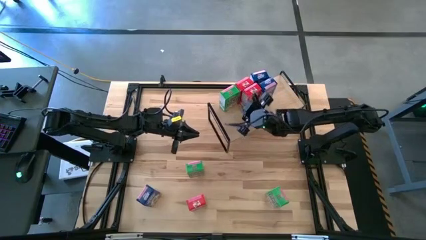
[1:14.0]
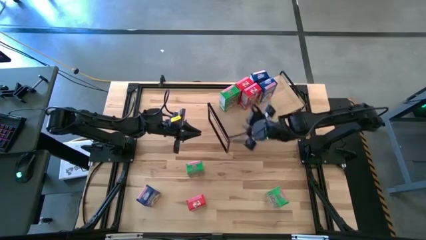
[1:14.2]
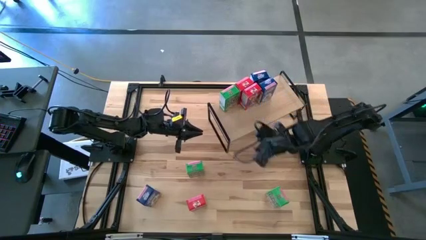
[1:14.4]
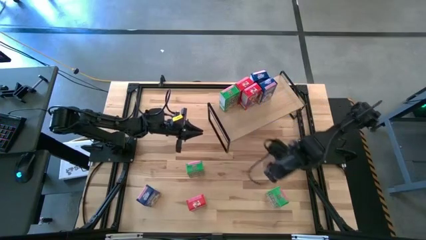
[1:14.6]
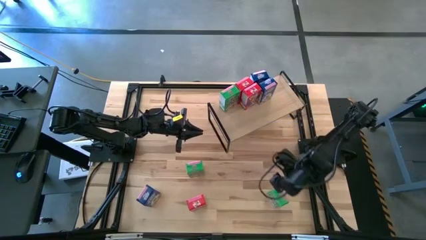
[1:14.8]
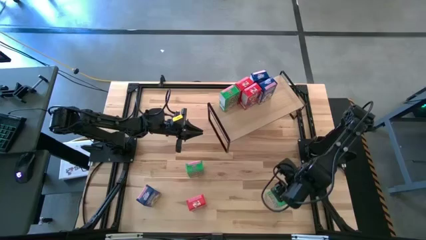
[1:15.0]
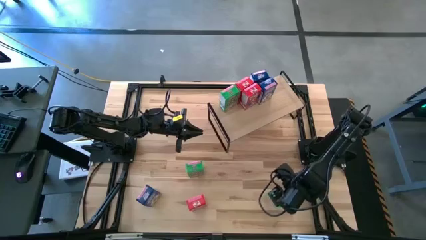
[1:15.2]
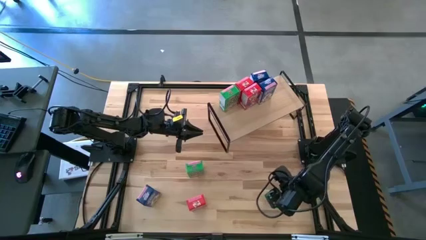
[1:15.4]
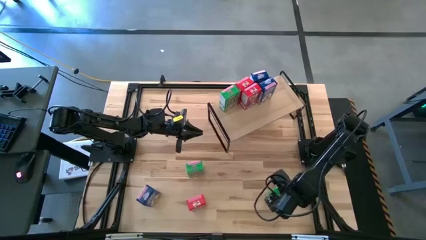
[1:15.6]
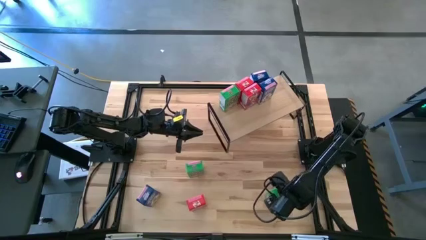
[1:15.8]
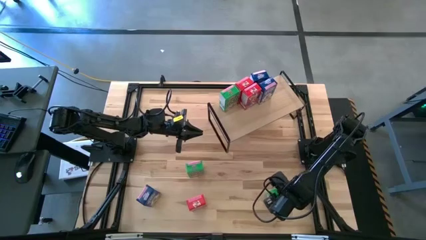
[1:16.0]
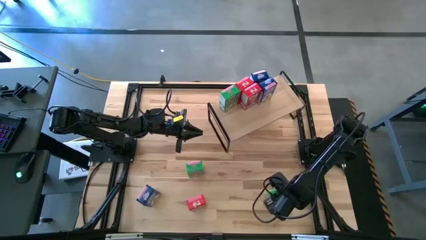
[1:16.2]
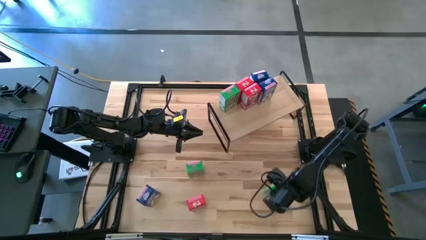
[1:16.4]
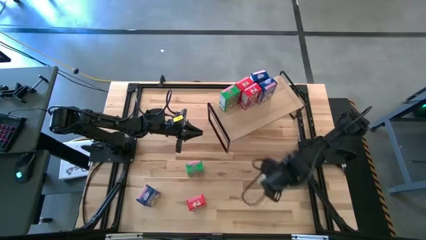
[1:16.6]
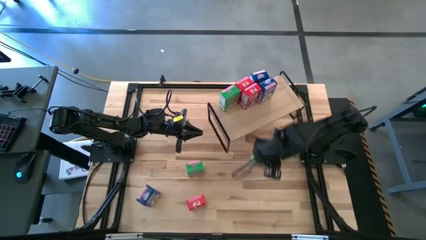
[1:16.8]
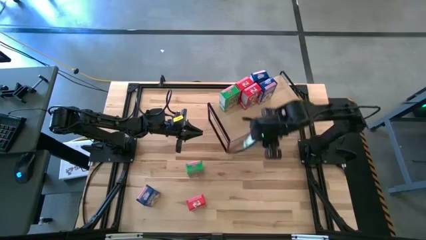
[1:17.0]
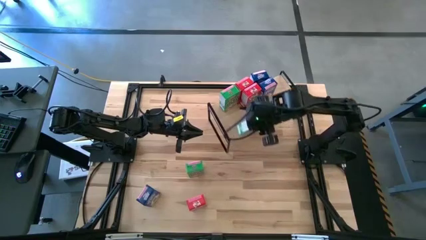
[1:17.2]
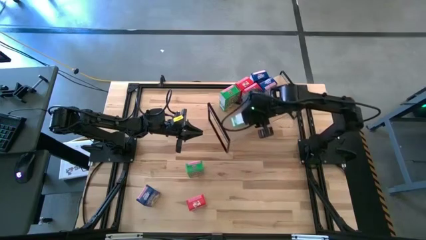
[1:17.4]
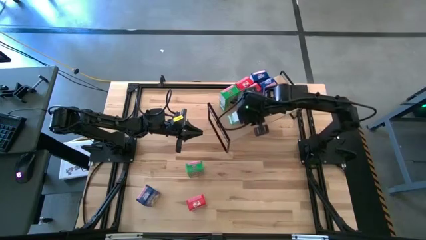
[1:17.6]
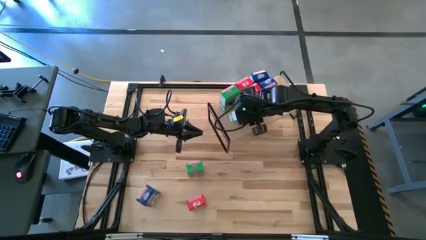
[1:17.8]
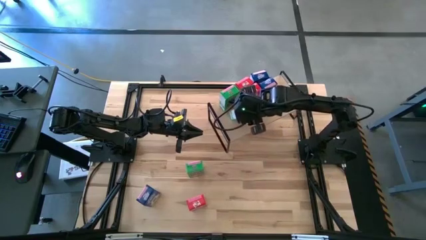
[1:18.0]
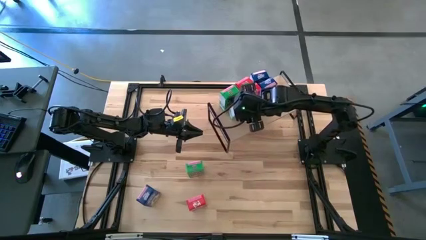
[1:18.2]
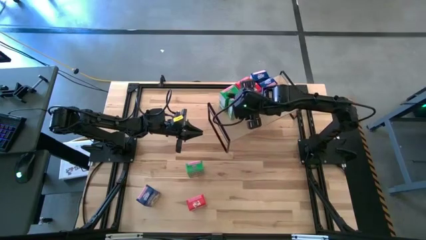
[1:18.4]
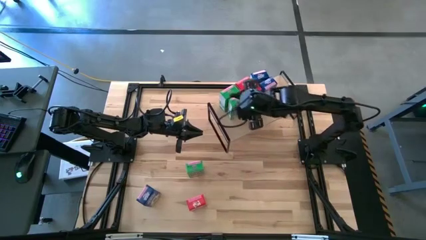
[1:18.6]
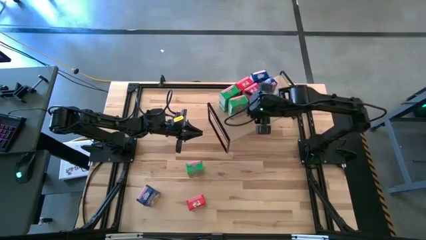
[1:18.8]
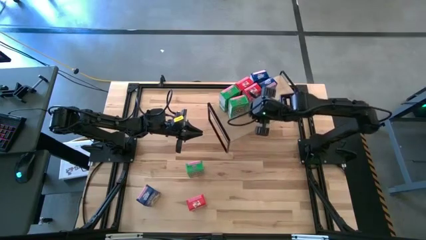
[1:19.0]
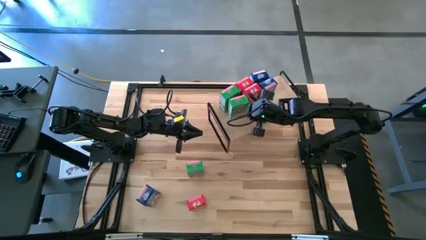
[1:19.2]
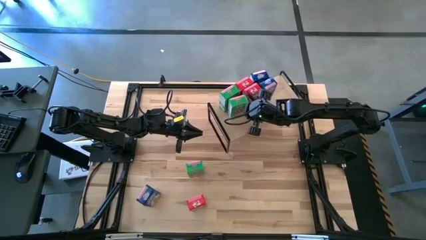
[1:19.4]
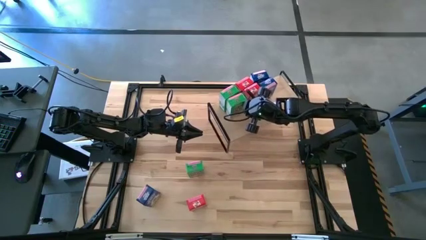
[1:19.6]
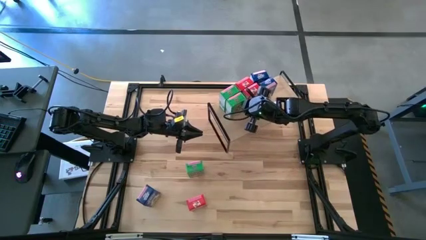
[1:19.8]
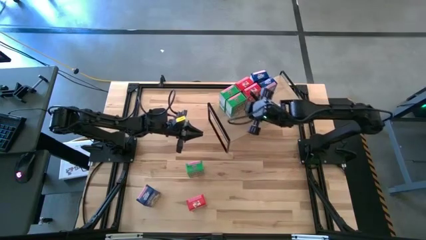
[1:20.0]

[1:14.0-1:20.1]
Task: Stack cereal on shelf
Put the right green cereal box on the shelf and aligned with the other green cereal box

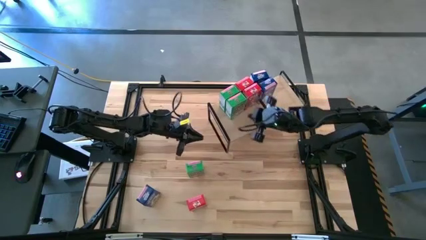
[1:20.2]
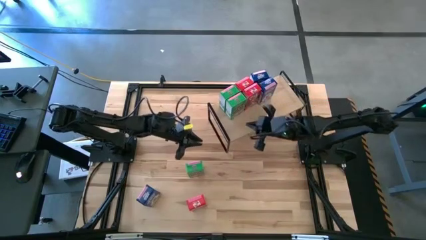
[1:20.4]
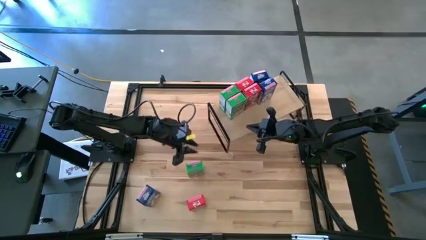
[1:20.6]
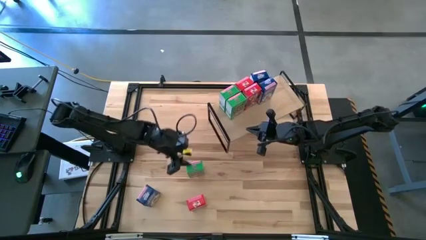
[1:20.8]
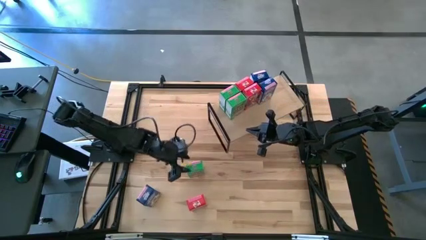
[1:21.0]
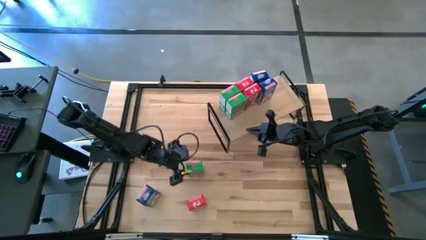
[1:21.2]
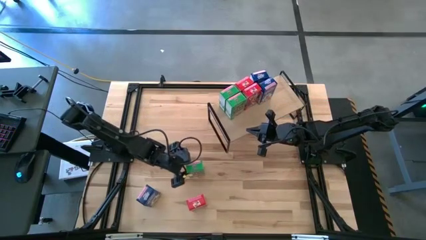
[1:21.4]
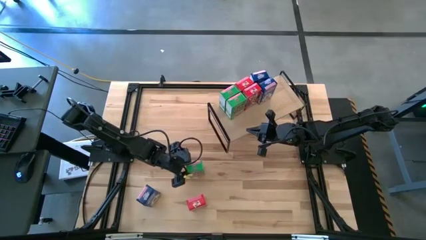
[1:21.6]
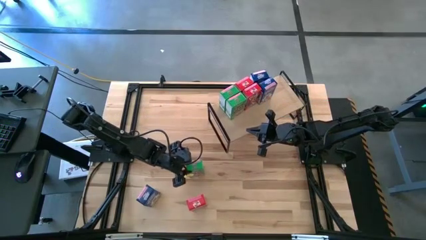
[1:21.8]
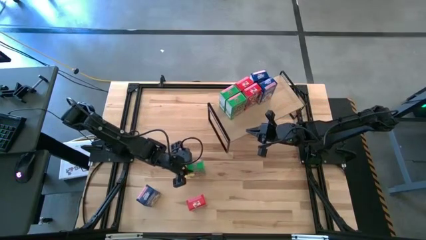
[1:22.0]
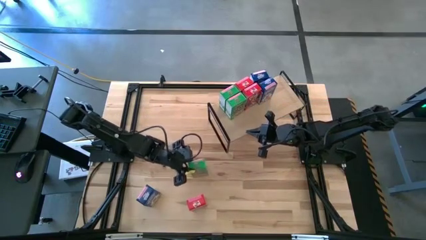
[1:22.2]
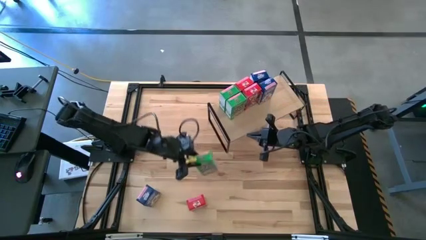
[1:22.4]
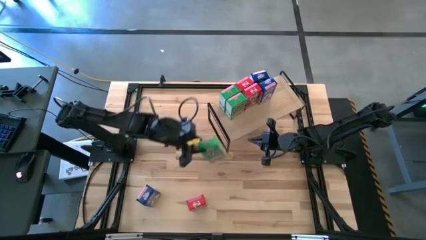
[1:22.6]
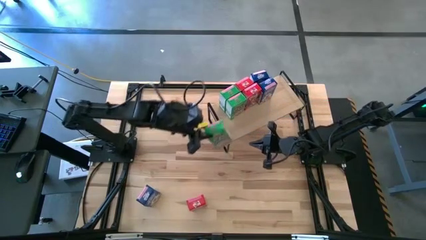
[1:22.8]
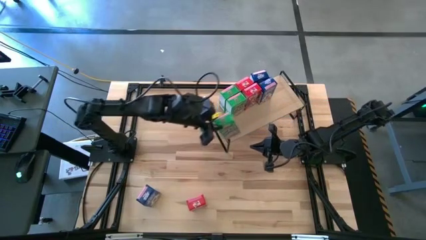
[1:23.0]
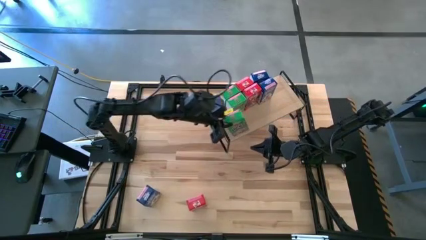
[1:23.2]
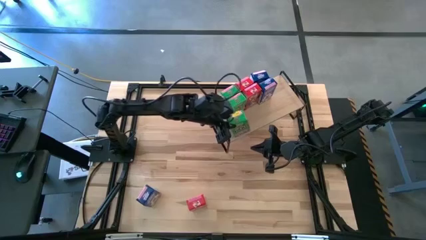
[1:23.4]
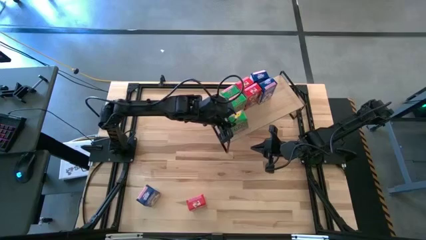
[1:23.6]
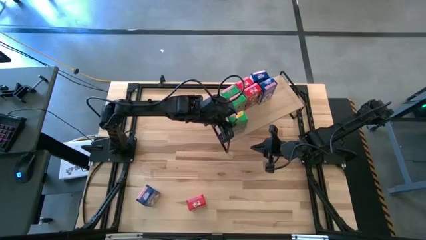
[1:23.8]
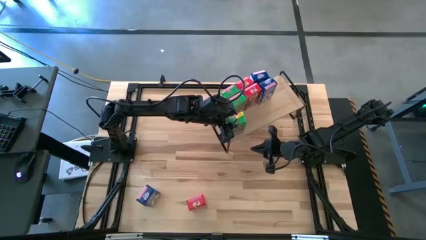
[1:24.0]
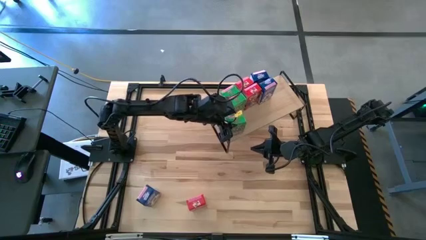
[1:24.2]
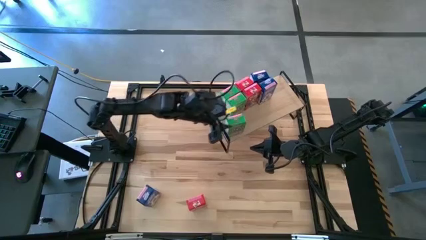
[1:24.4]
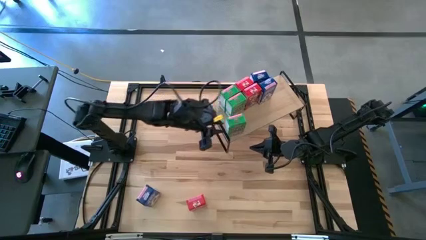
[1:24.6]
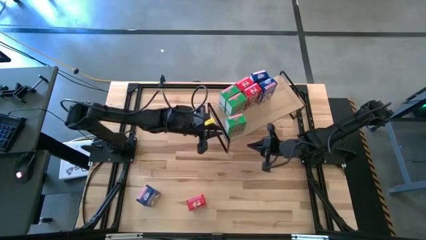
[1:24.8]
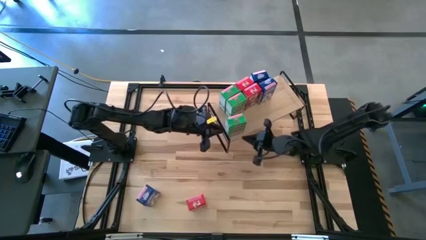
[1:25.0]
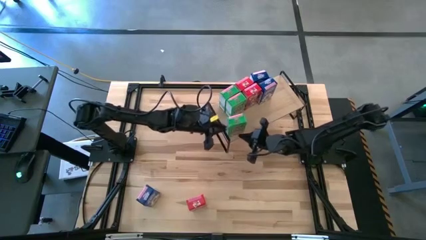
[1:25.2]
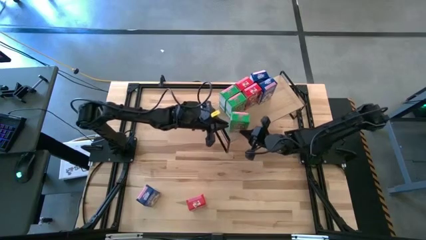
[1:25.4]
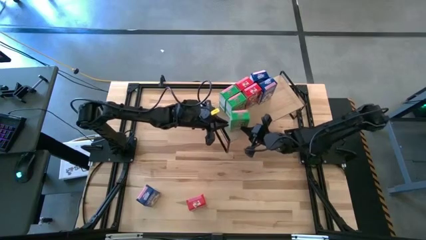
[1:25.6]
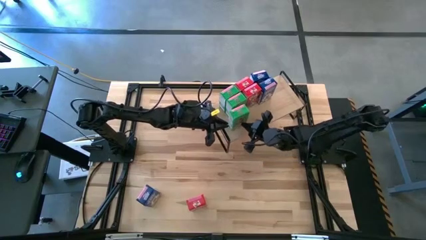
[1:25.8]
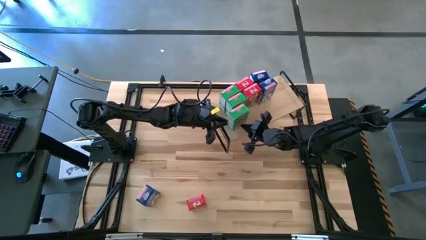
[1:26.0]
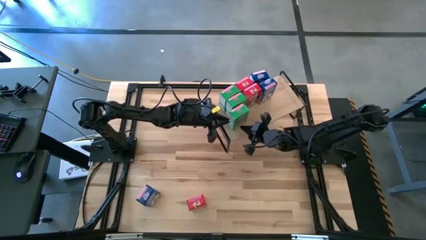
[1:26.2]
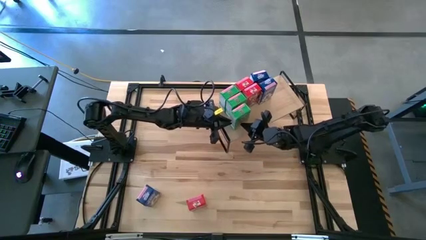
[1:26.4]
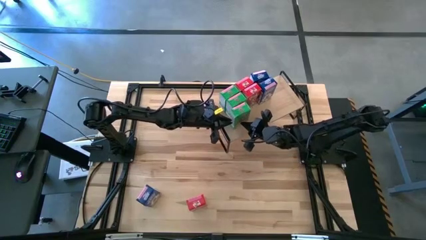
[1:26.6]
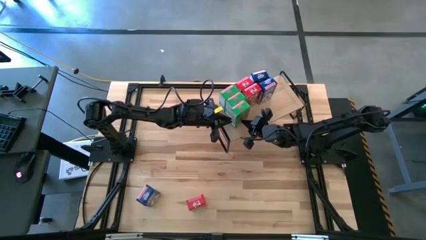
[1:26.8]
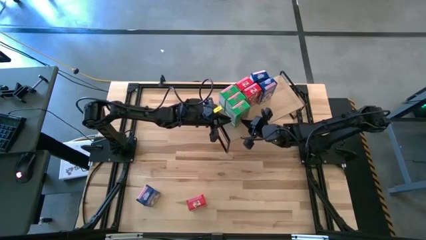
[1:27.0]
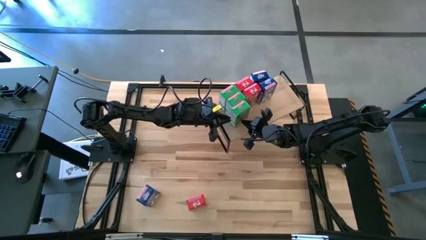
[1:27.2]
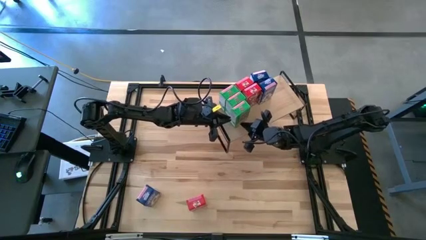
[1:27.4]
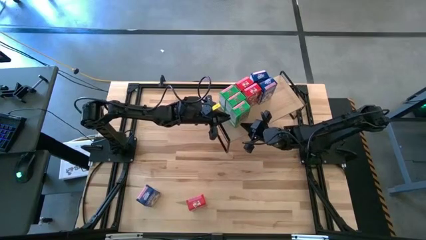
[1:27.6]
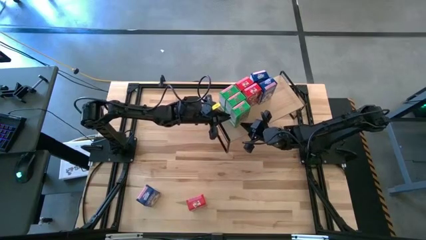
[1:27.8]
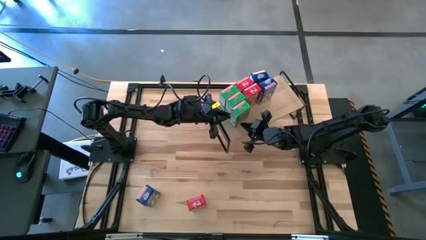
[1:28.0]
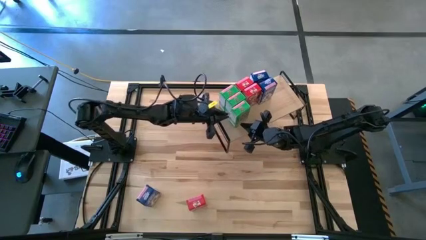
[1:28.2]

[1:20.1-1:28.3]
Put the green cereal box on the shelf and aligned with the other green cereal boxes

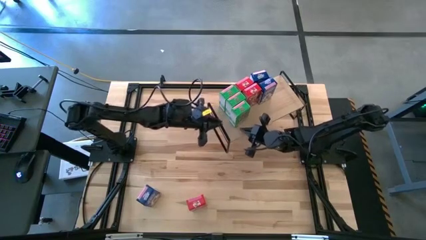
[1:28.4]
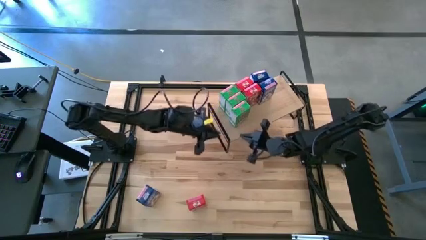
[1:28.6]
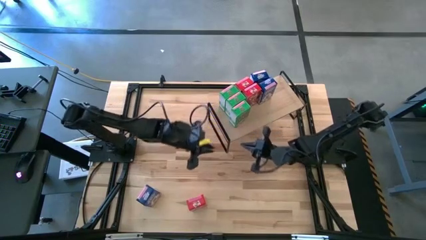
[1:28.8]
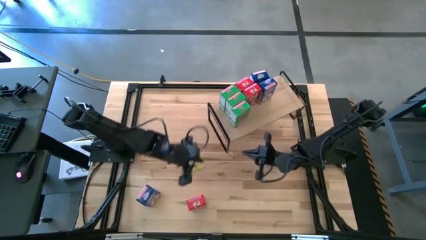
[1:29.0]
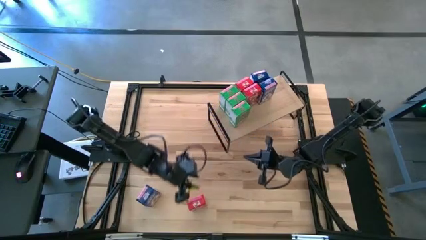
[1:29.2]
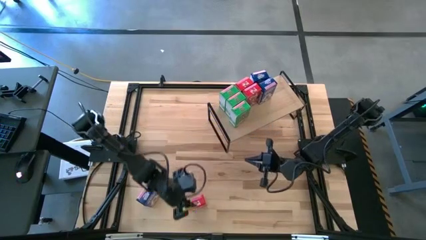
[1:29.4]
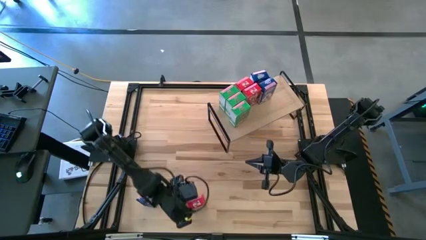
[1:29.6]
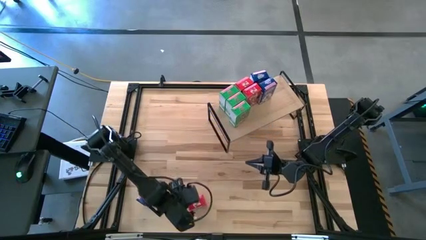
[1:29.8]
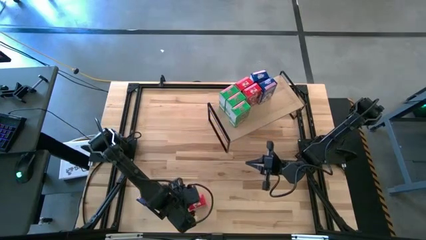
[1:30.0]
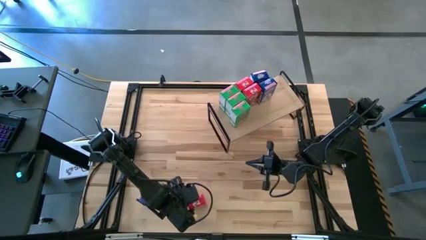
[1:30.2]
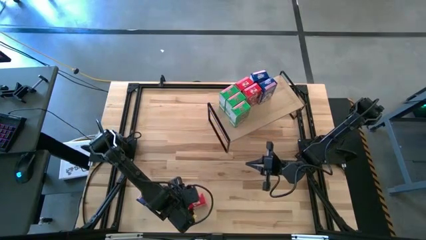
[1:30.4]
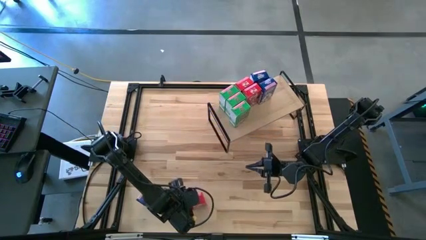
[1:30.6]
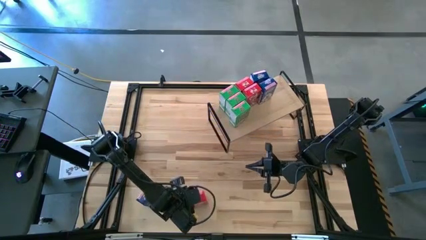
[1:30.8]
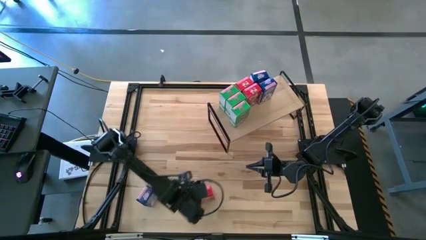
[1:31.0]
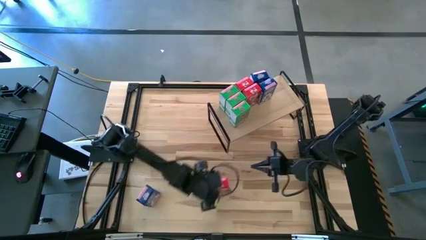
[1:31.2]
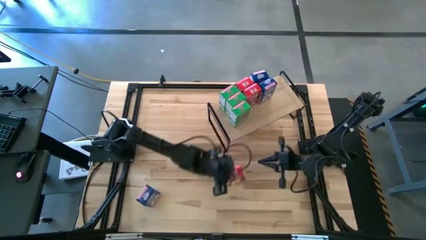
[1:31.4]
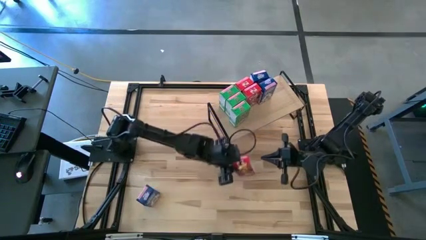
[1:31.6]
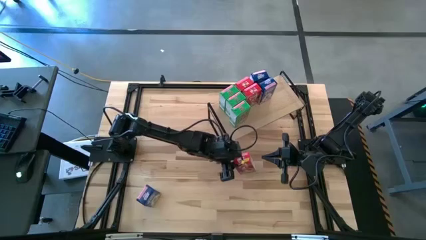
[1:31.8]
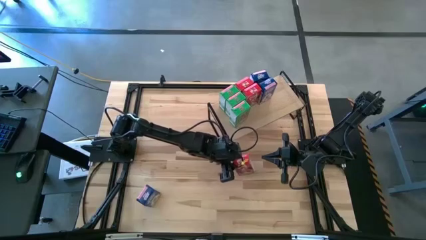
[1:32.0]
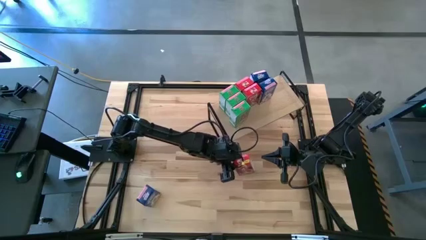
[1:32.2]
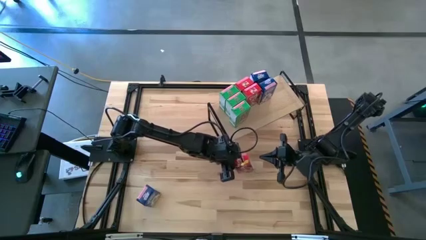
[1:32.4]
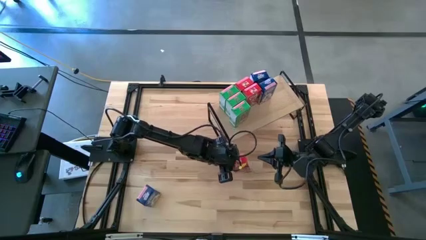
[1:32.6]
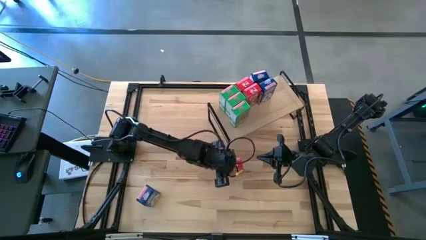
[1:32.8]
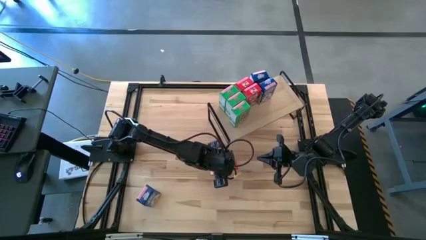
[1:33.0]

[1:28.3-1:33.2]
Put the red cereal box on the shelf and aligned with the other red cereal boxes
